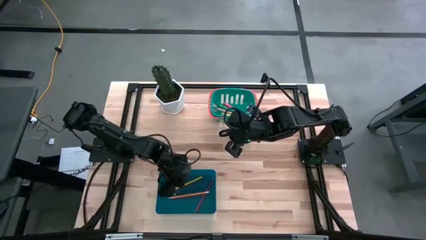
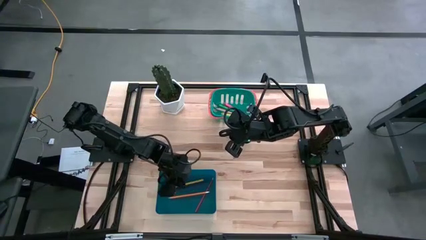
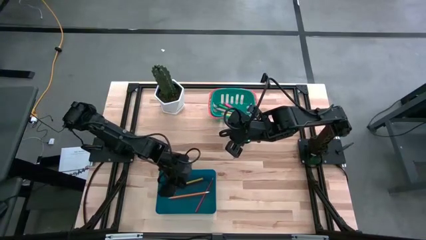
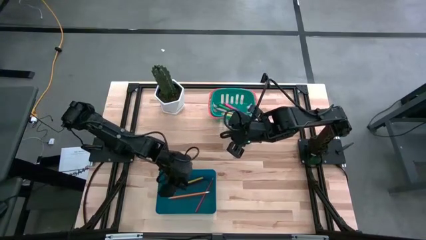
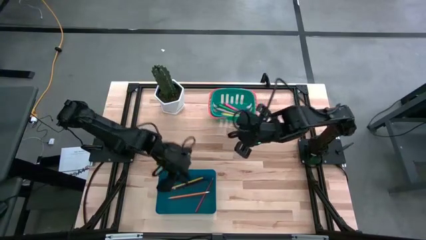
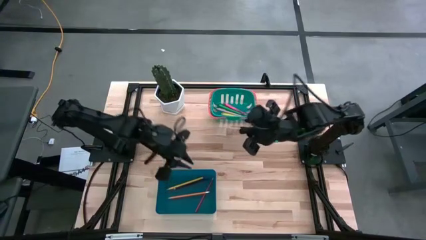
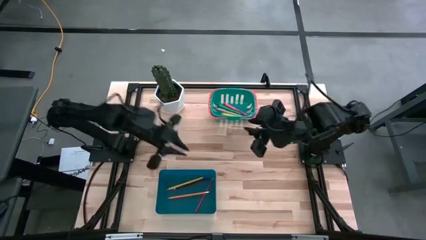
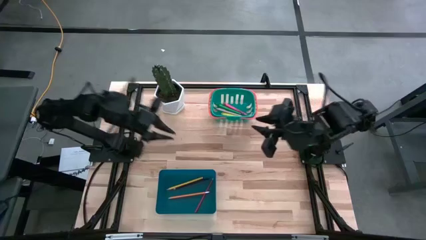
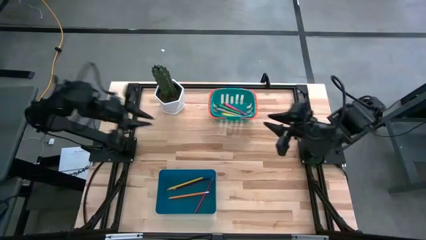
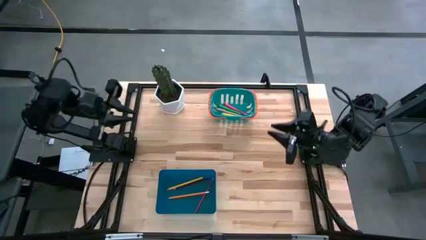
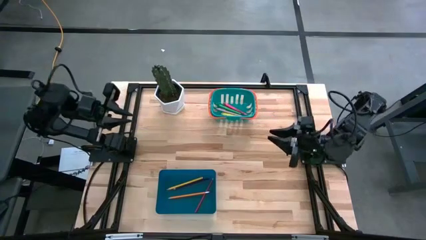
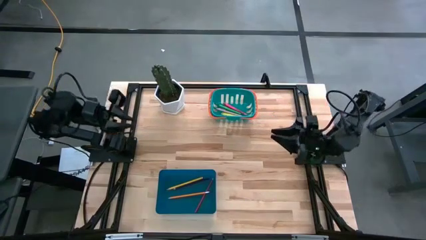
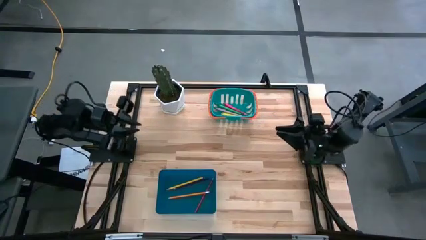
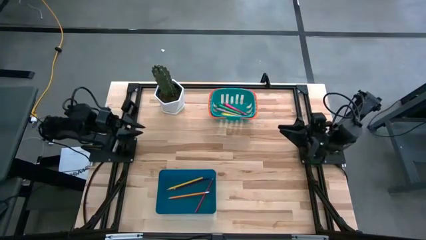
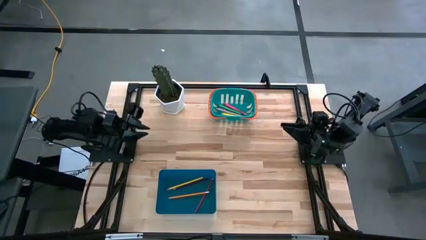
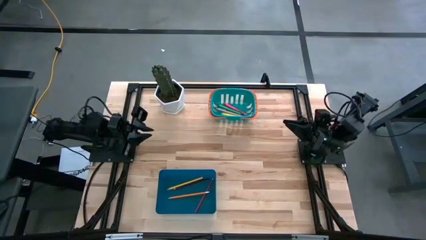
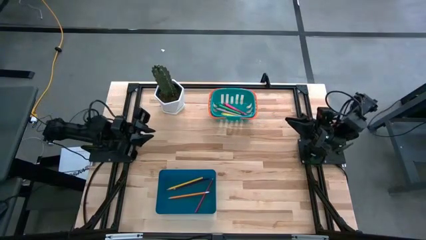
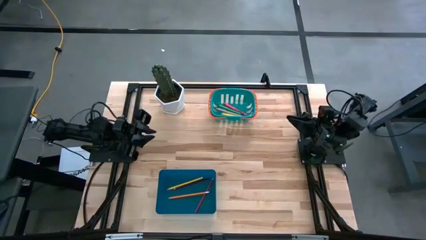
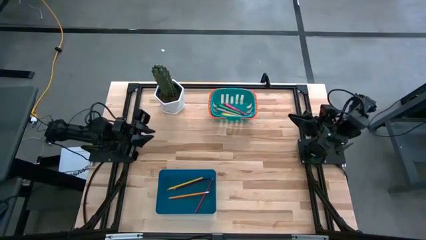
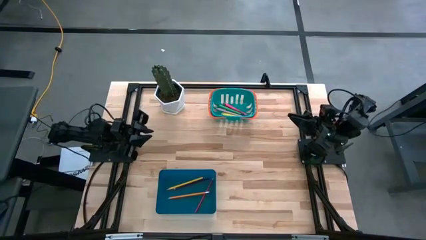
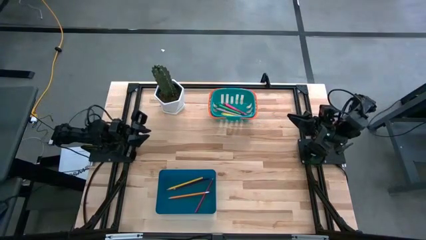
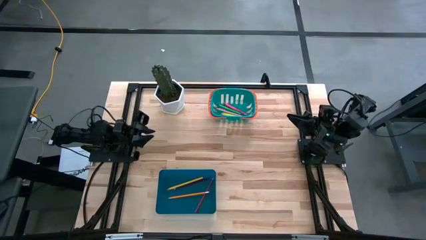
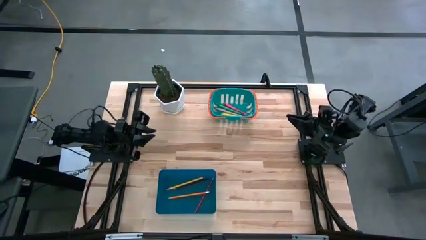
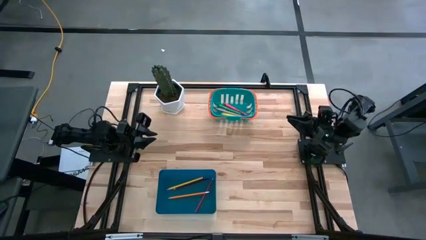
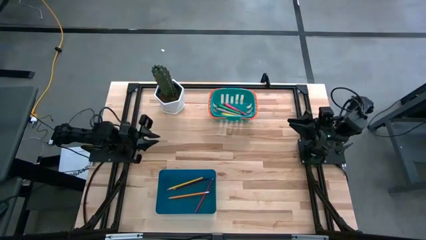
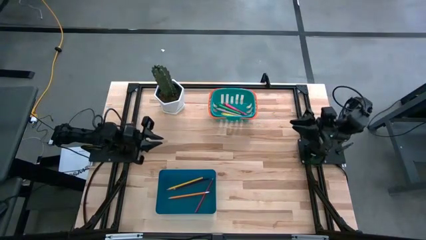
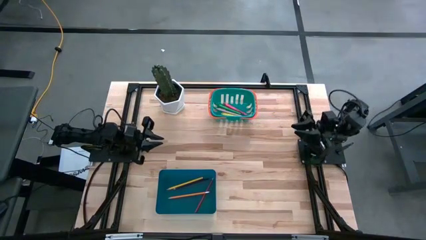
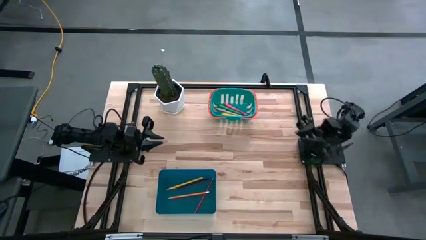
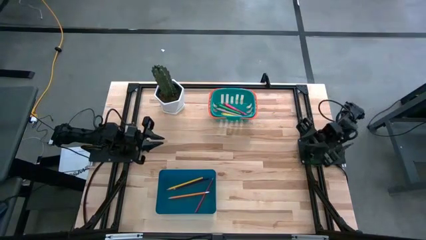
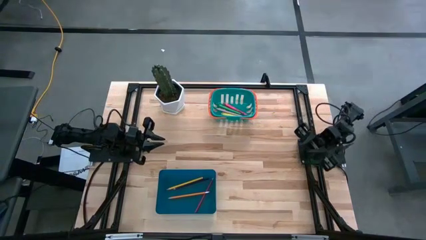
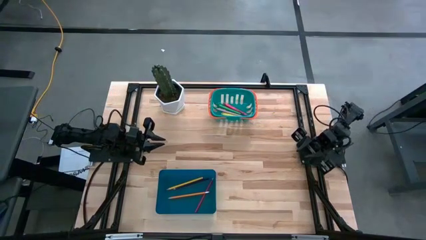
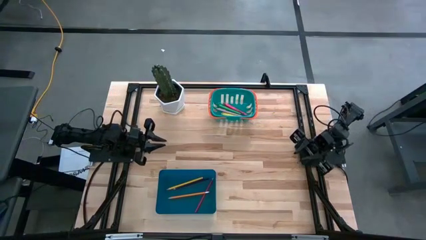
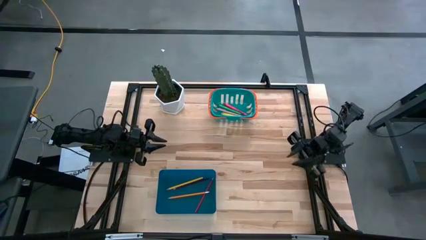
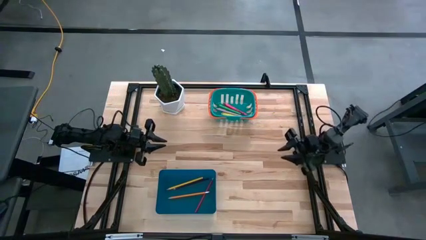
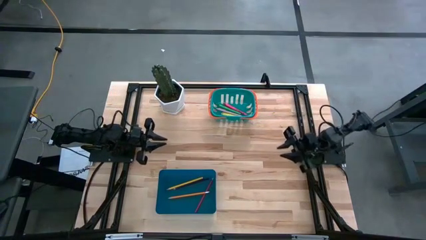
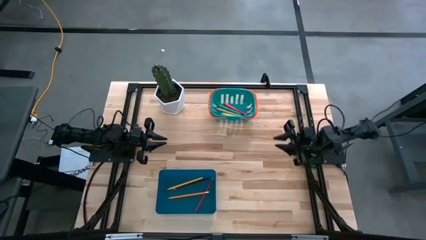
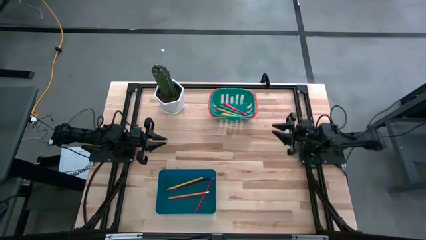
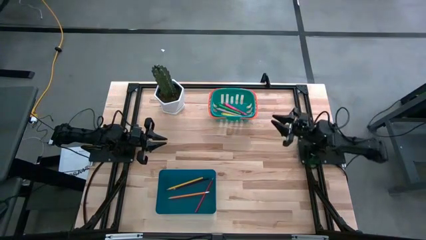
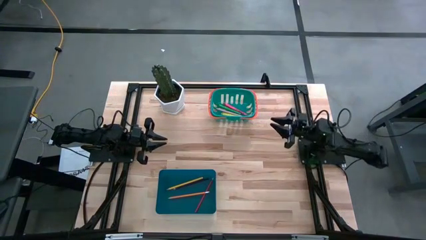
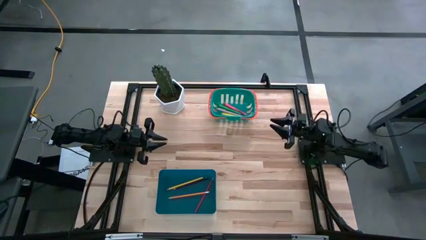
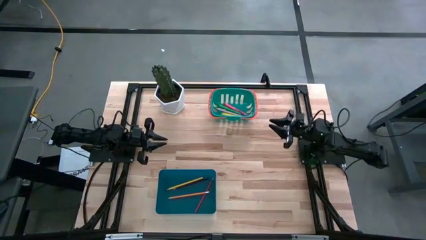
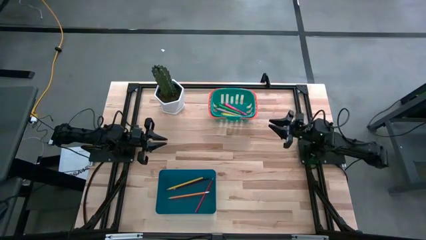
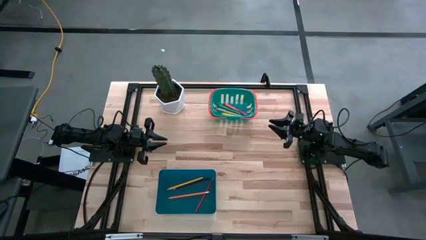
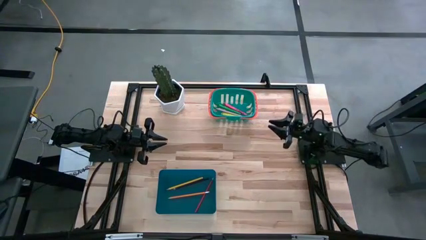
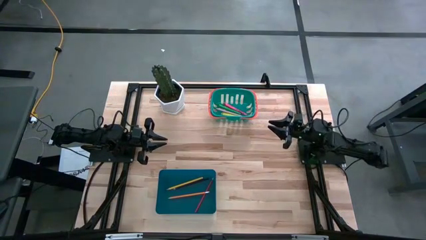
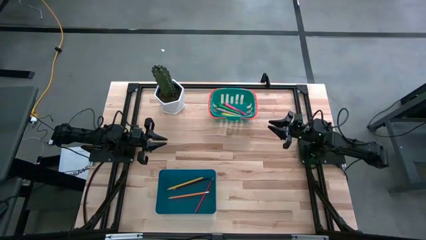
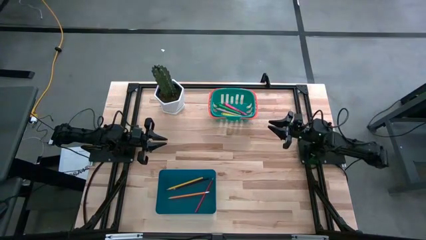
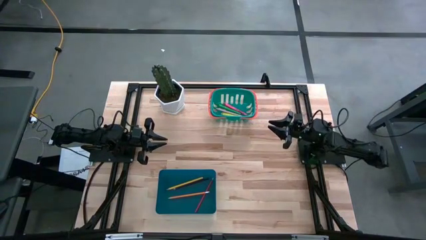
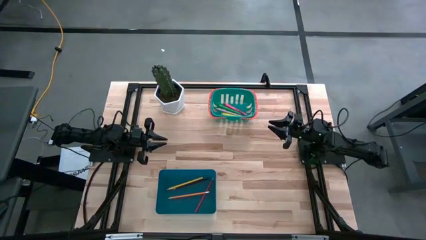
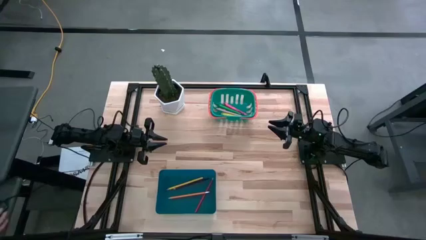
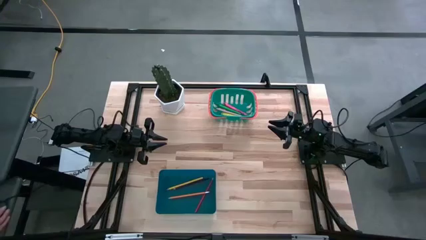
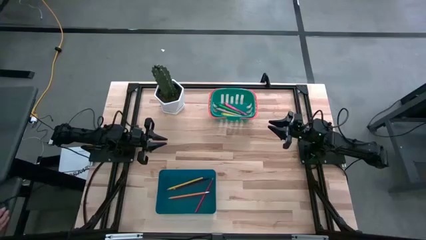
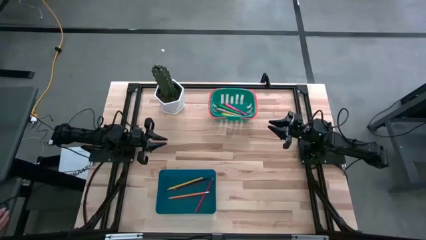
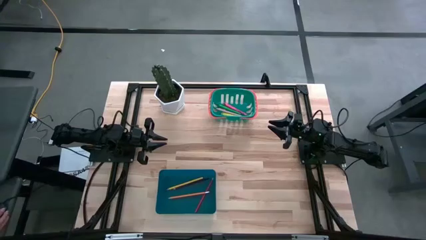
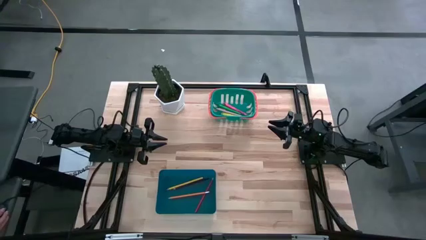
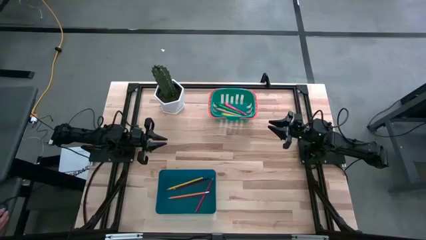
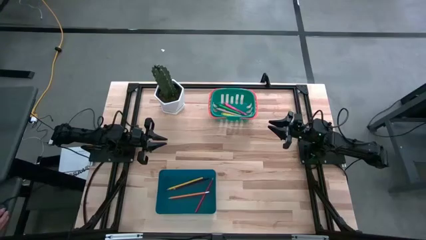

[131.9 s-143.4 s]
Task: Sort pens & pencils
Return to Home Position

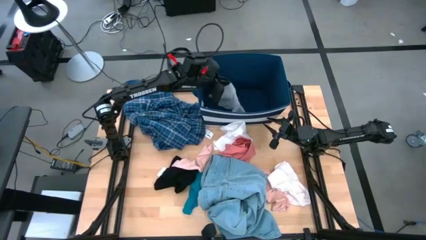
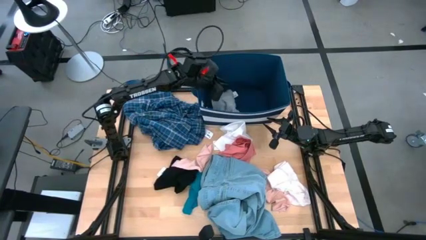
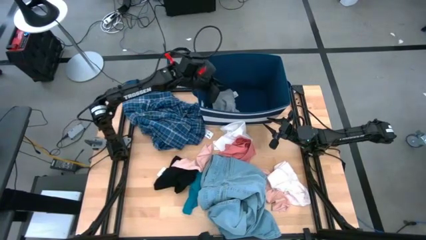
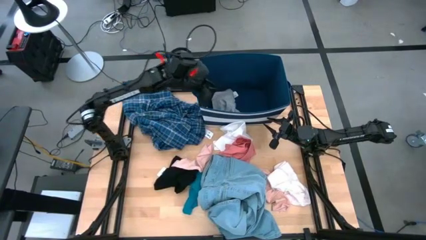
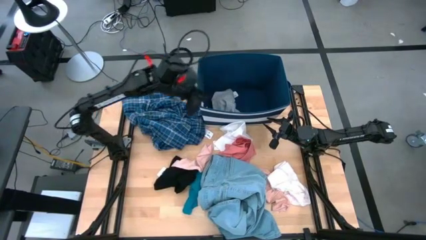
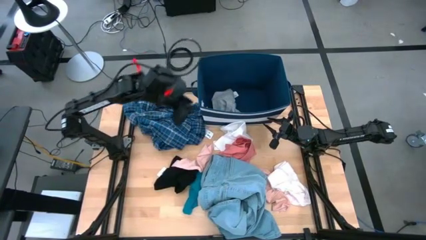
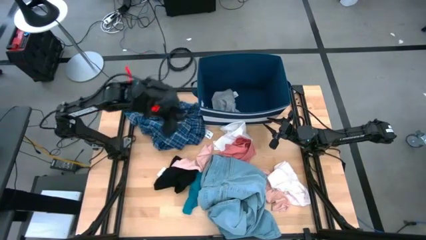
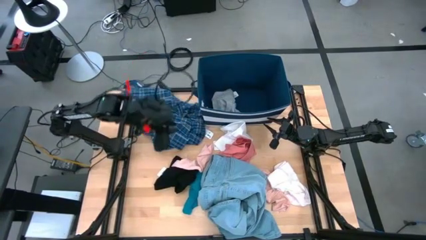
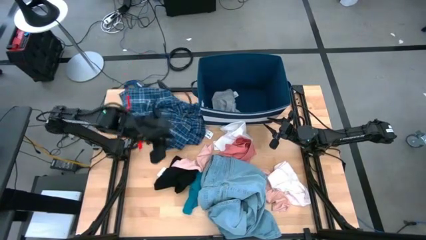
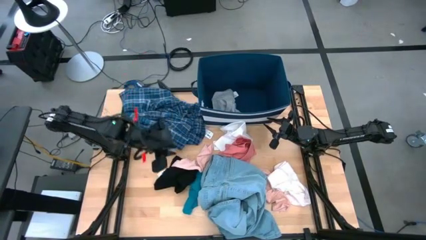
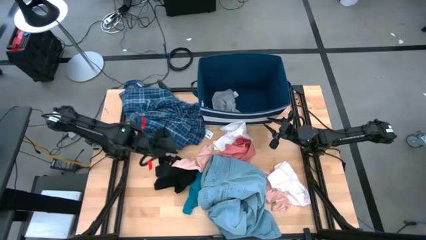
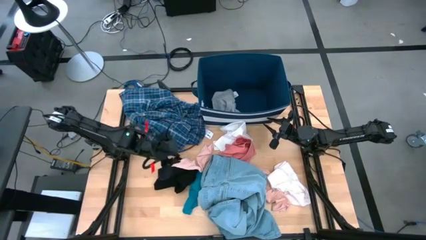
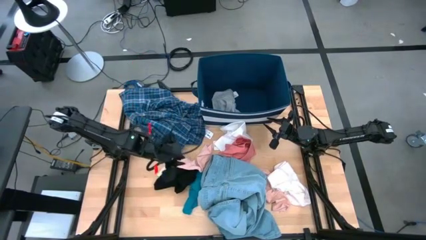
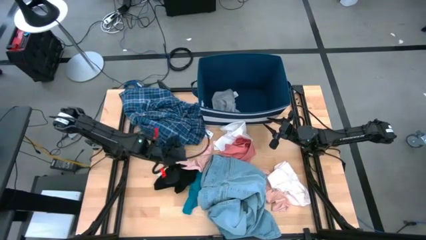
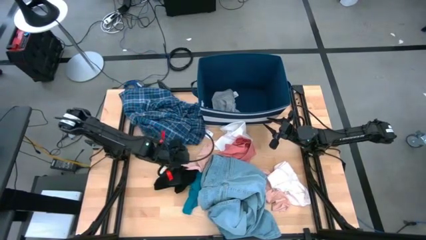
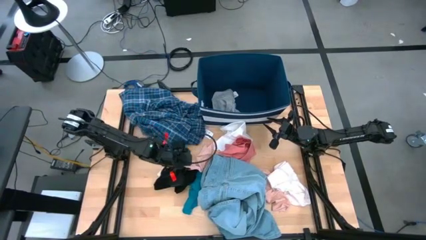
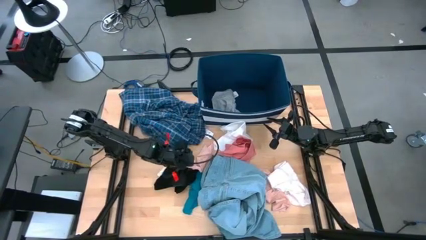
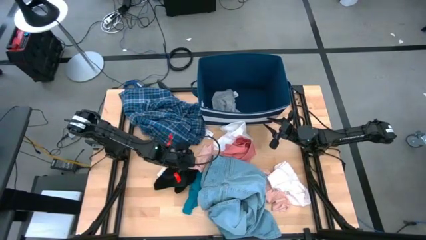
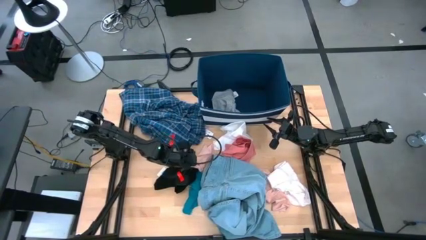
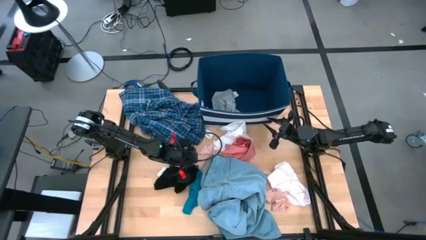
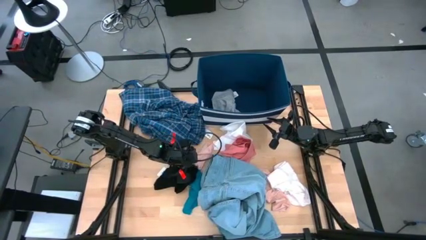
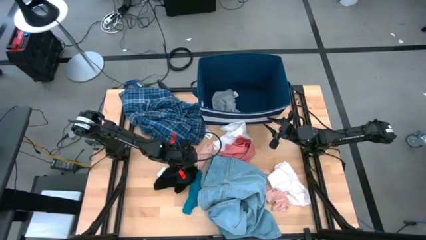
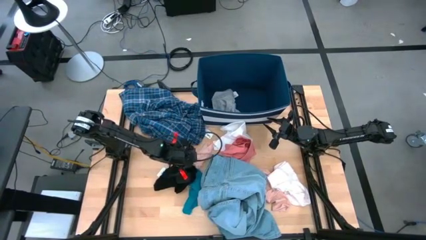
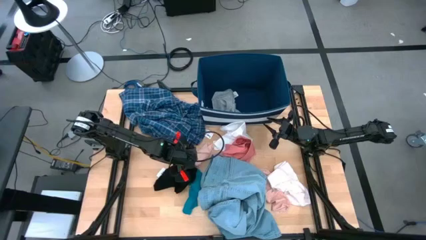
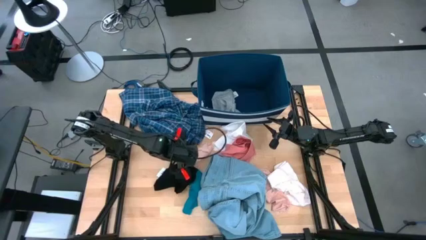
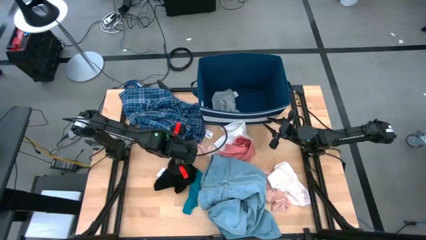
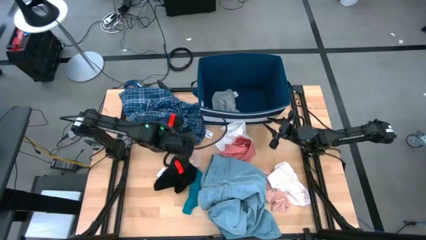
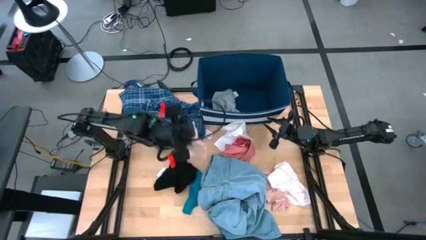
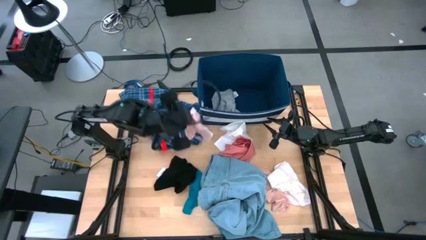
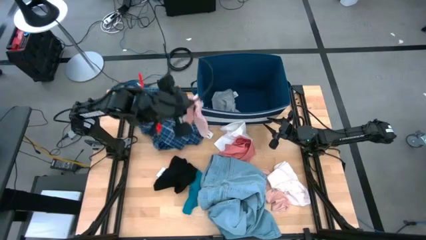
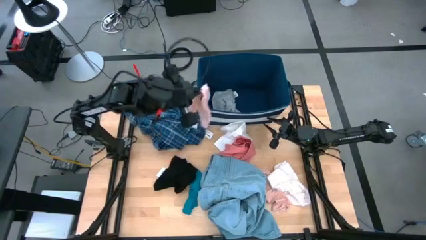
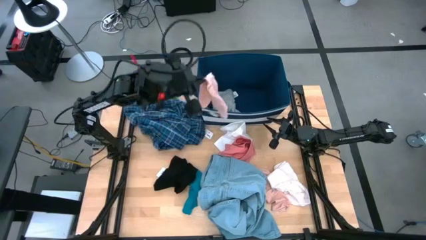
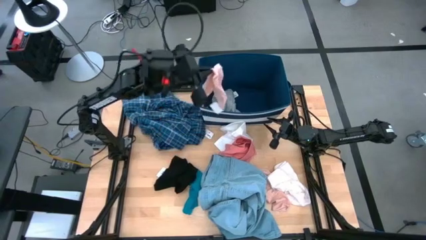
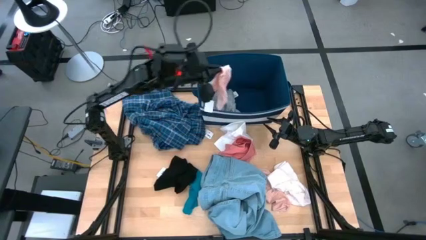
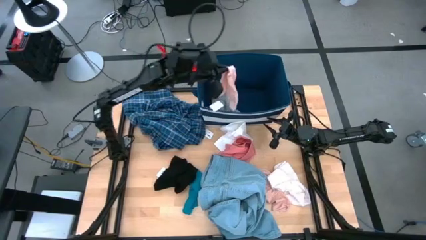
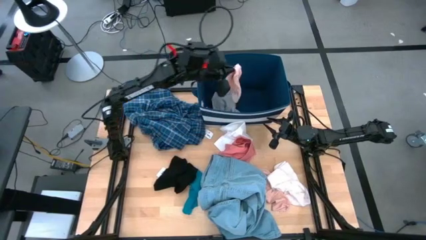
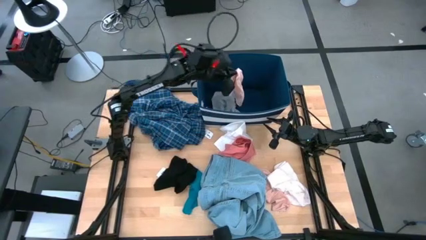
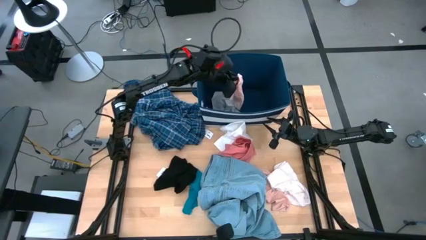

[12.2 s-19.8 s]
Task: Sort clothes
Put the top pink sock into the blue laundry bin
